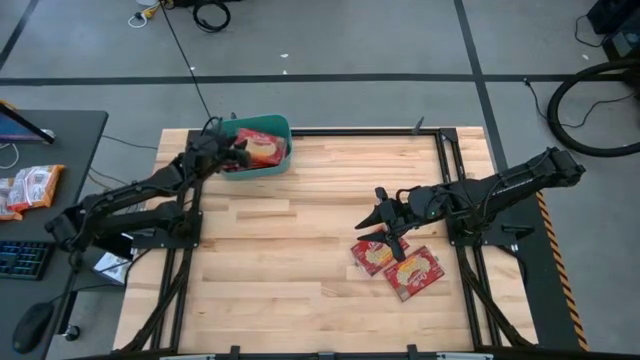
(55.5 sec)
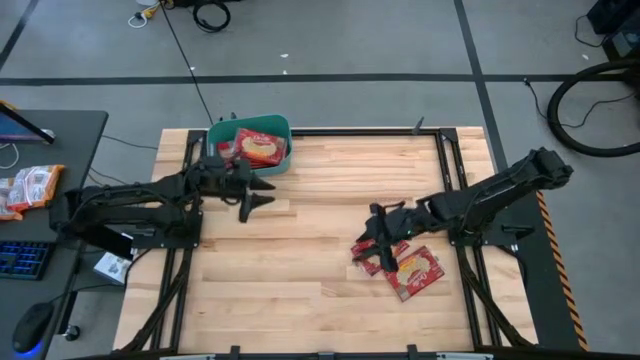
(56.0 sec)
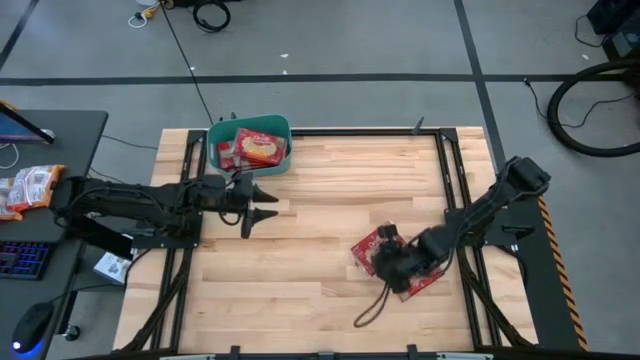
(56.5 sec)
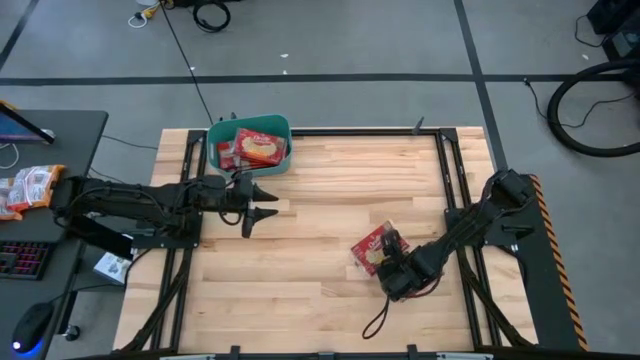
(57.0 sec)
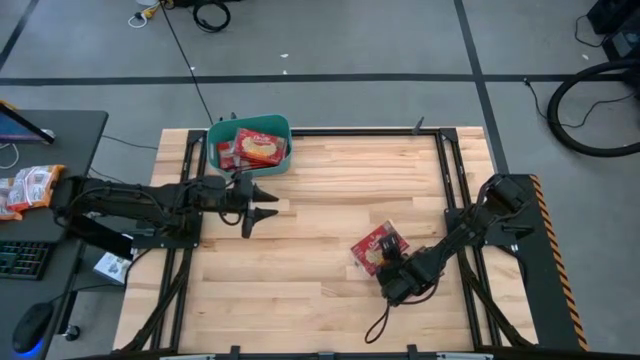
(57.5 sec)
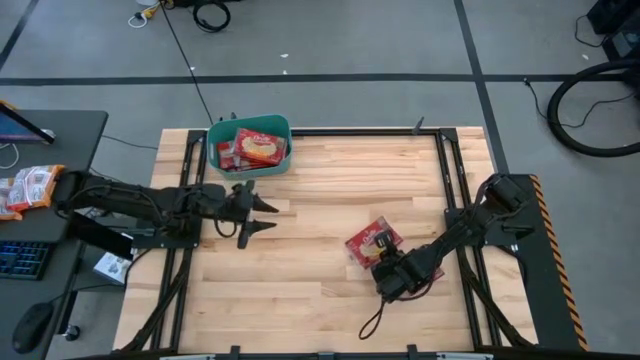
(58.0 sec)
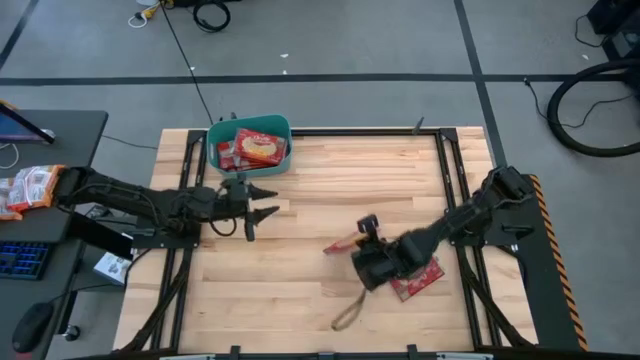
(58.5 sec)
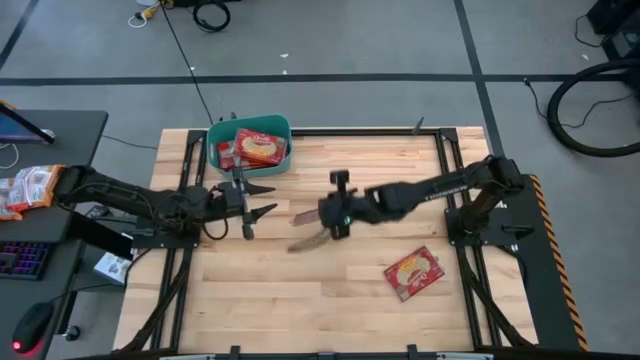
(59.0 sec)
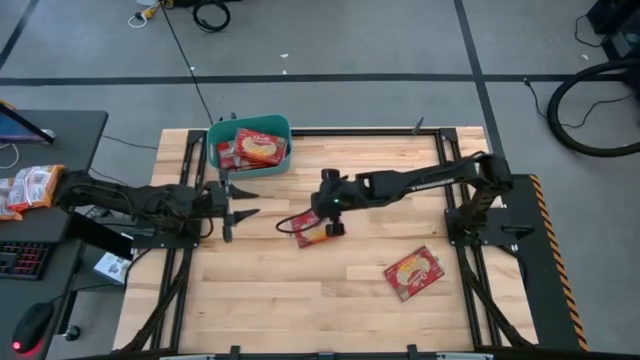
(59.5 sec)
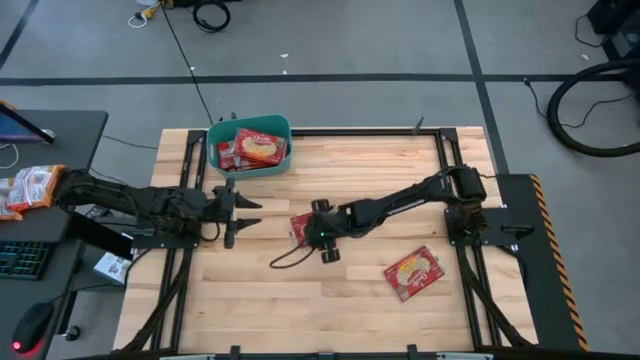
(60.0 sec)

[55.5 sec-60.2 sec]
Task: Sort popcorn bags into baskets
Put the popcorn sachet into the bin

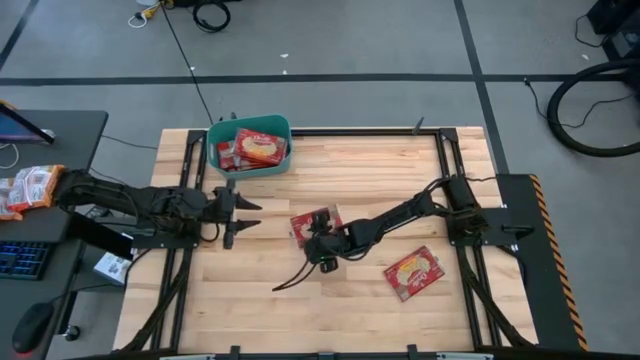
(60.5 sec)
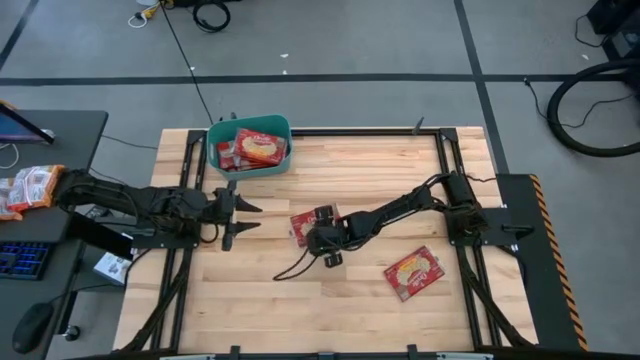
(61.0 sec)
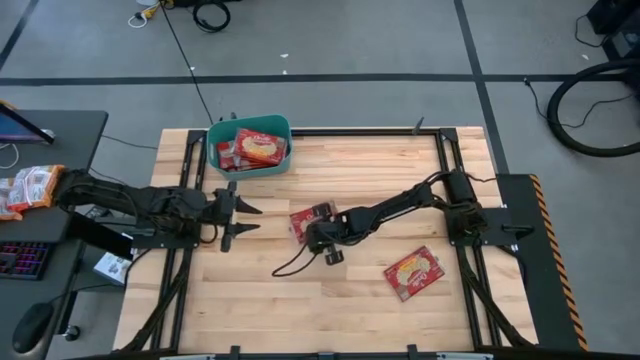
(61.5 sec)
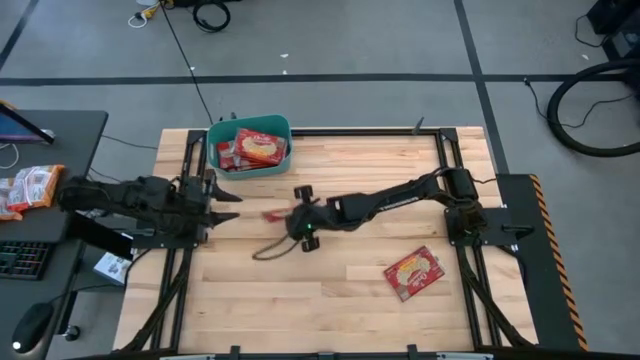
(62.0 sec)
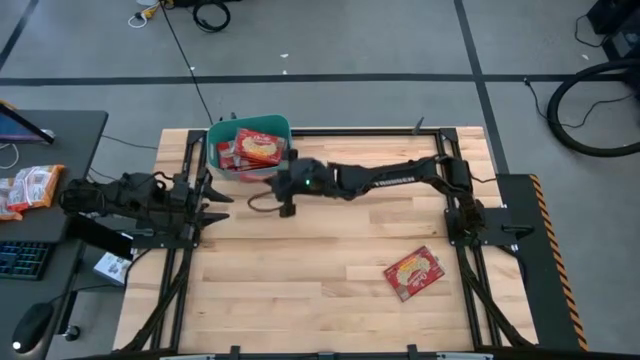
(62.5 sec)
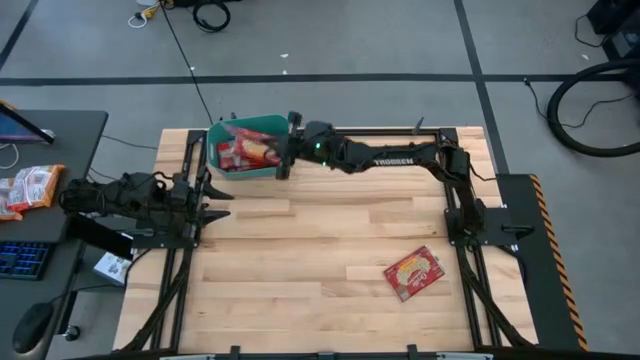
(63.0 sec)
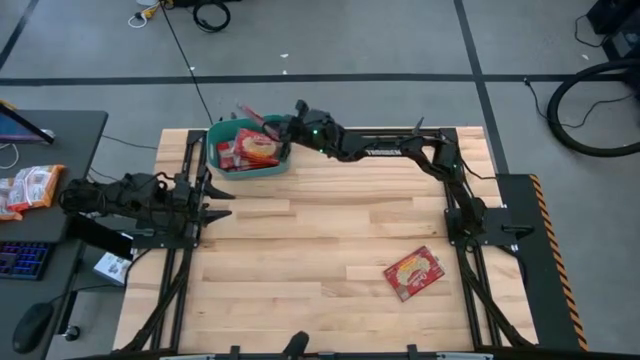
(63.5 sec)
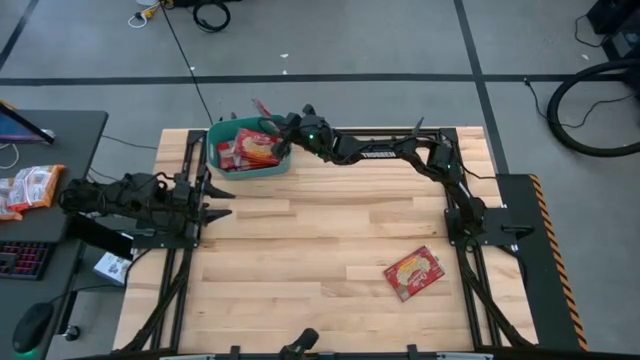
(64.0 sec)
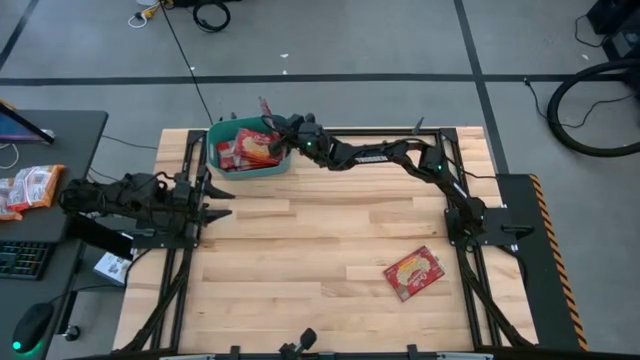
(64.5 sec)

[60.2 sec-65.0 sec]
Put the popcorn sachet into the bin

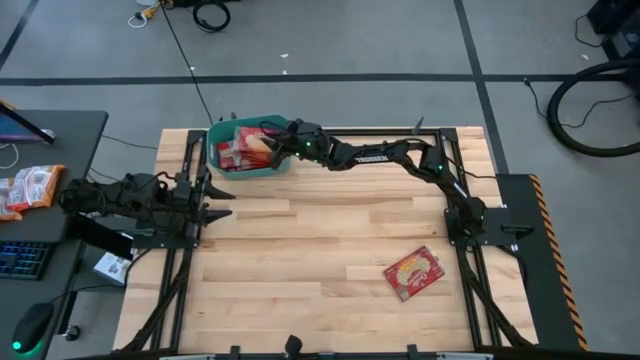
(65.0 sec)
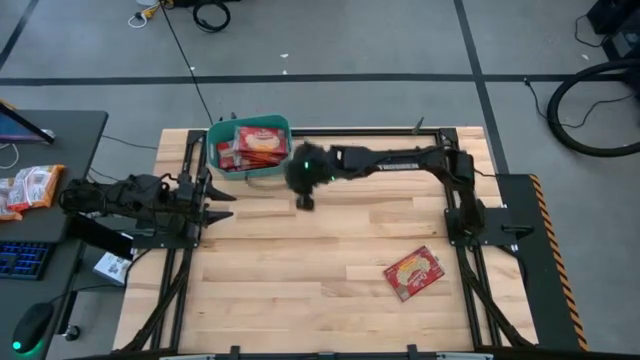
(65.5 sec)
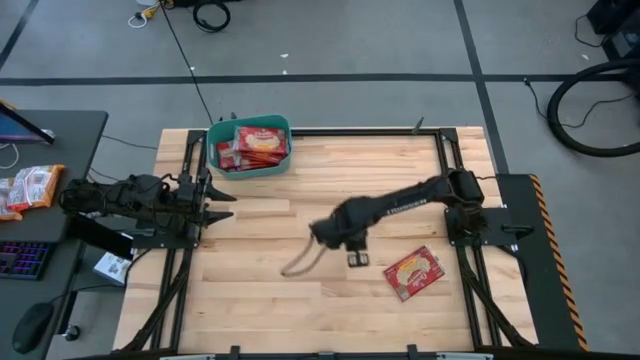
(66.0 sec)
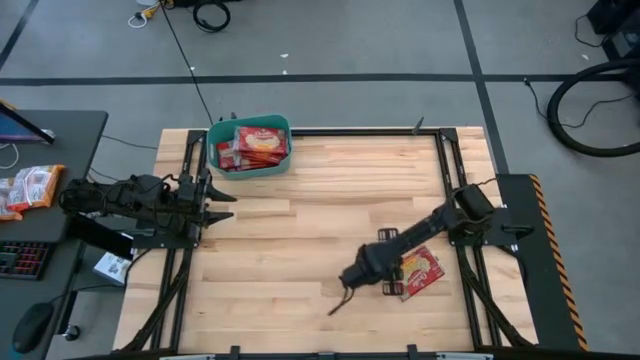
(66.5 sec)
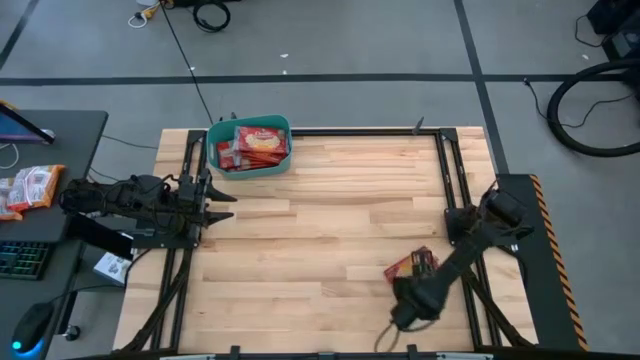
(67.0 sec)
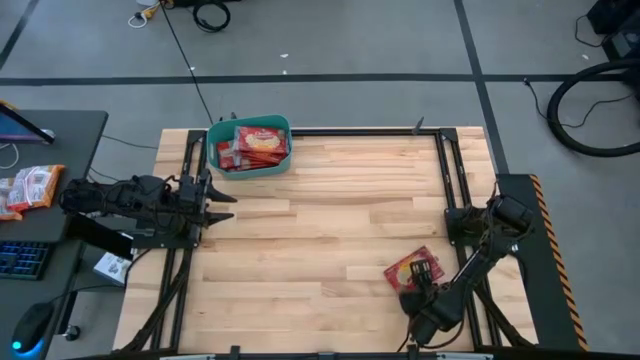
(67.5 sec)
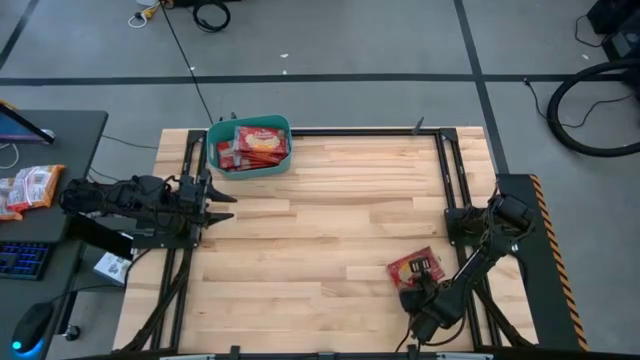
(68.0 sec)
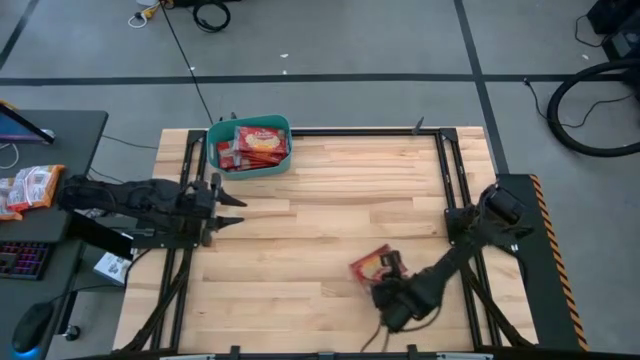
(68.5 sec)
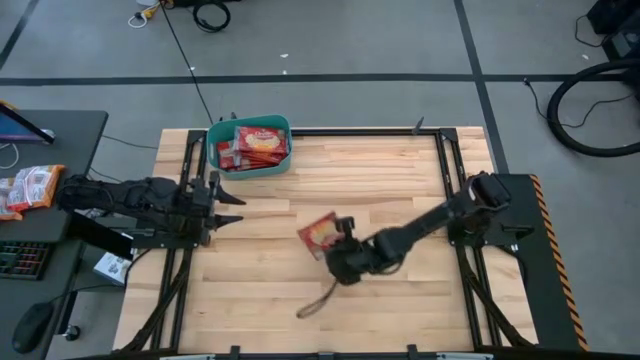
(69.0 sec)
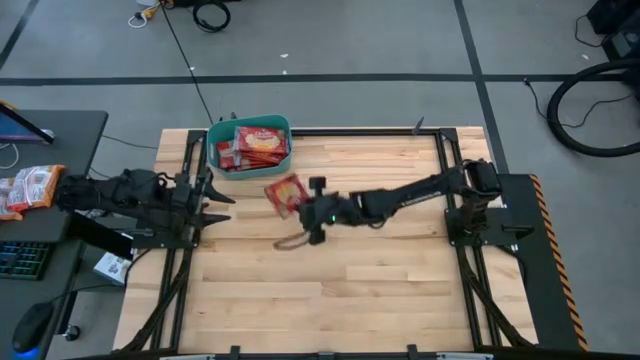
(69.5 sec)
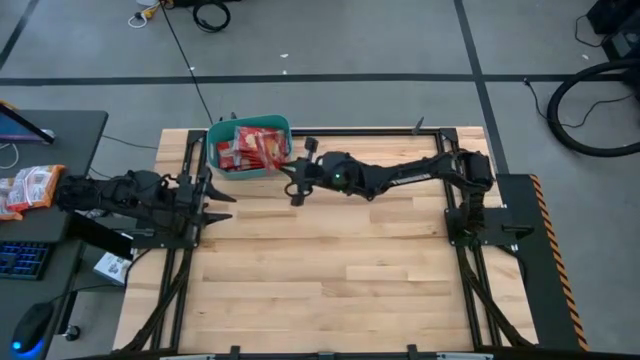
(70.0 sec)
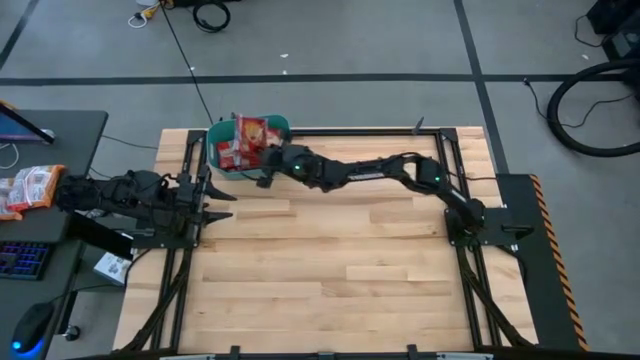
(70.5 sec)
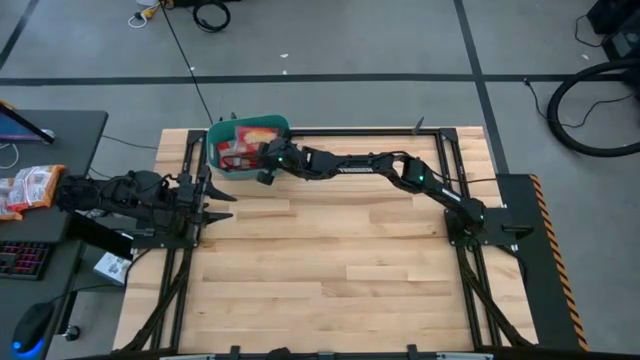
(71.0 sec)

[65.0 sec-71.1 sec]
Put the popcorn sachet into the bin

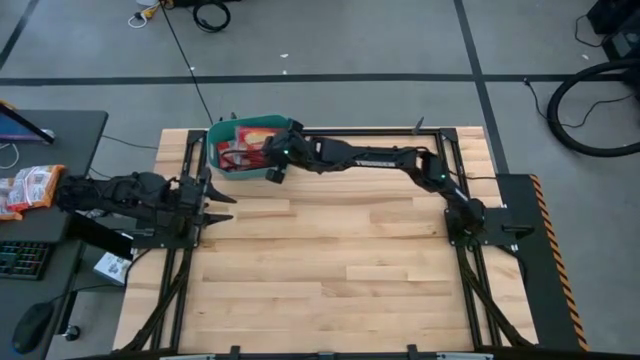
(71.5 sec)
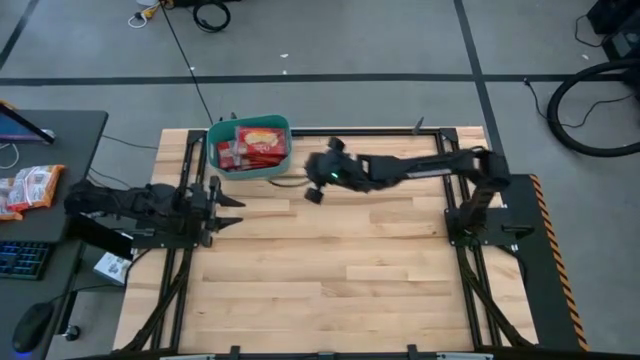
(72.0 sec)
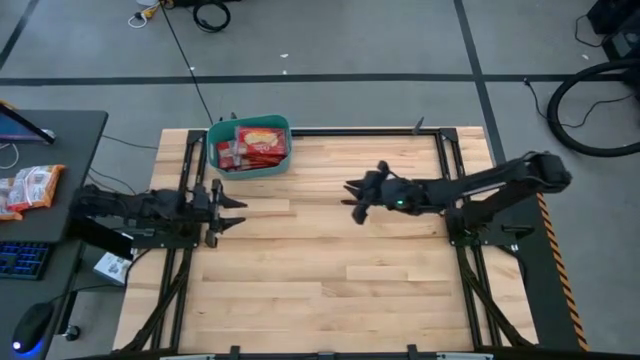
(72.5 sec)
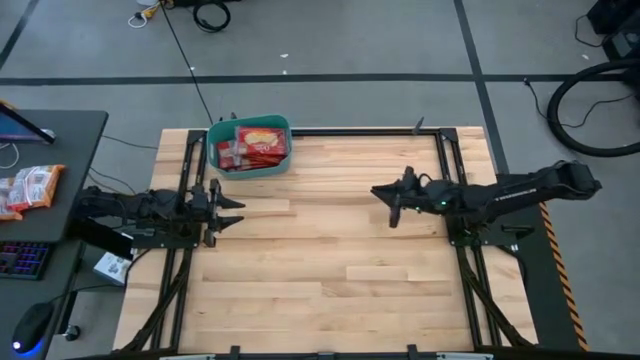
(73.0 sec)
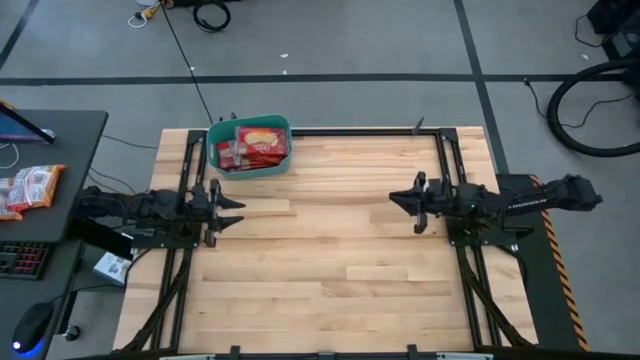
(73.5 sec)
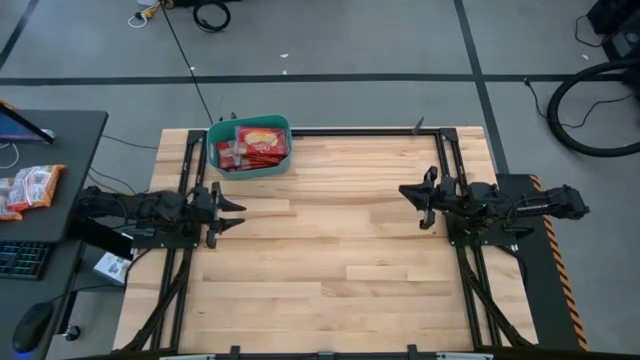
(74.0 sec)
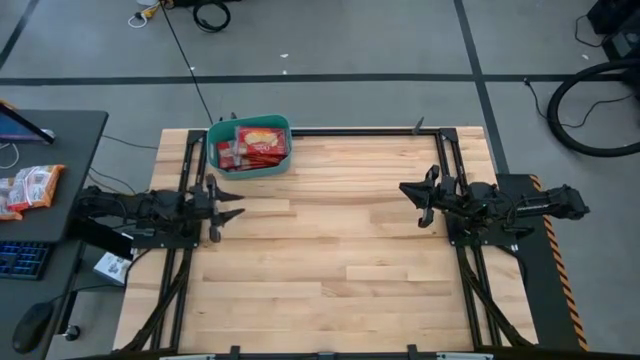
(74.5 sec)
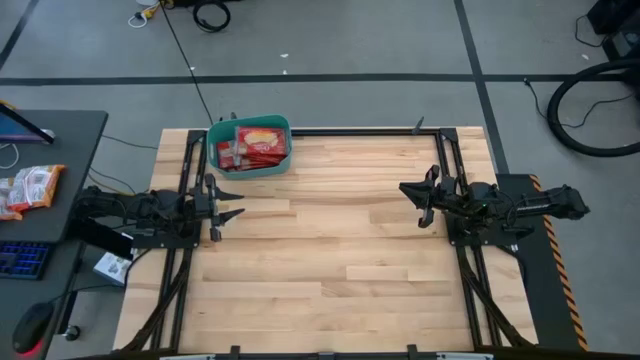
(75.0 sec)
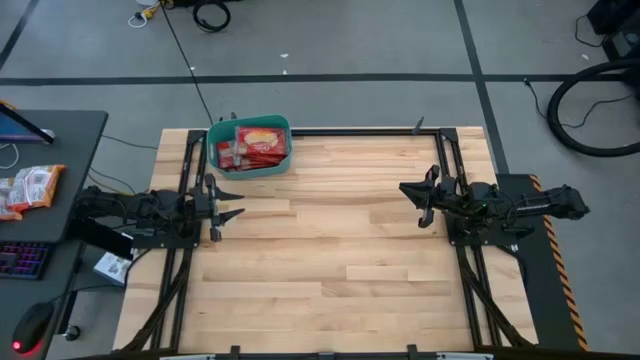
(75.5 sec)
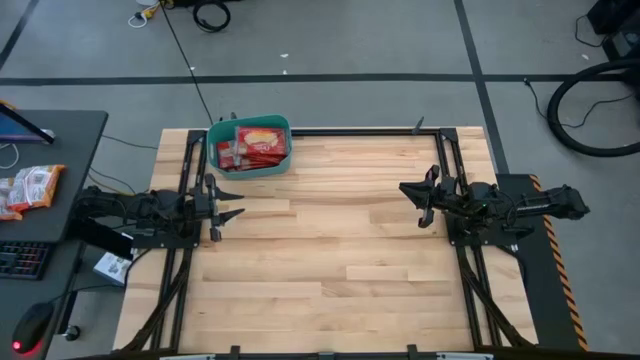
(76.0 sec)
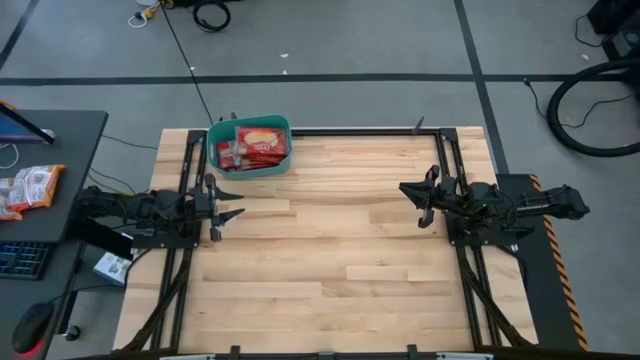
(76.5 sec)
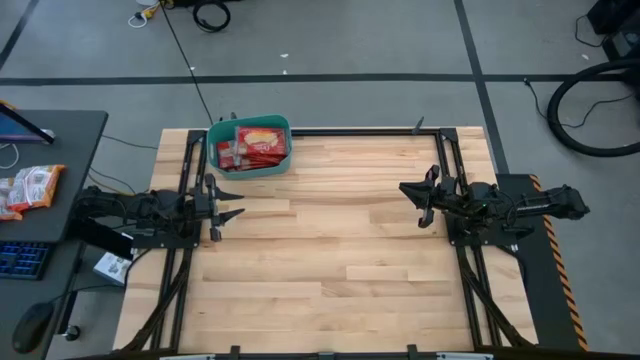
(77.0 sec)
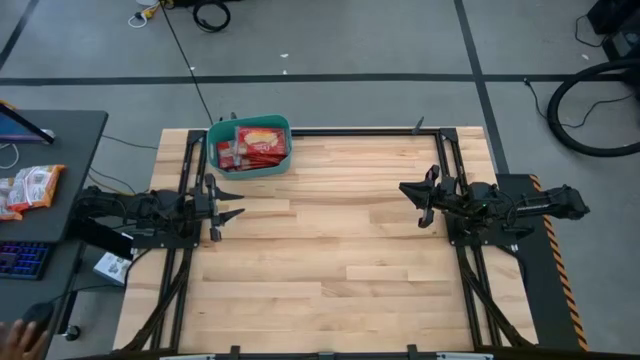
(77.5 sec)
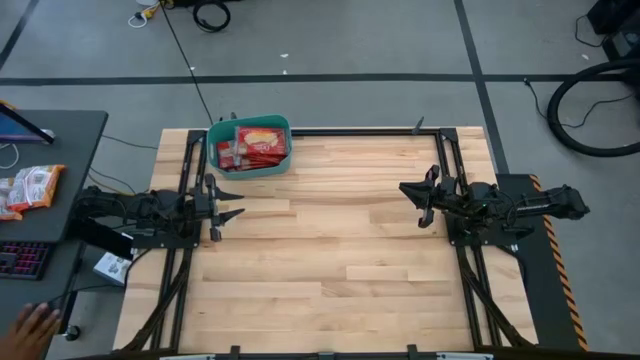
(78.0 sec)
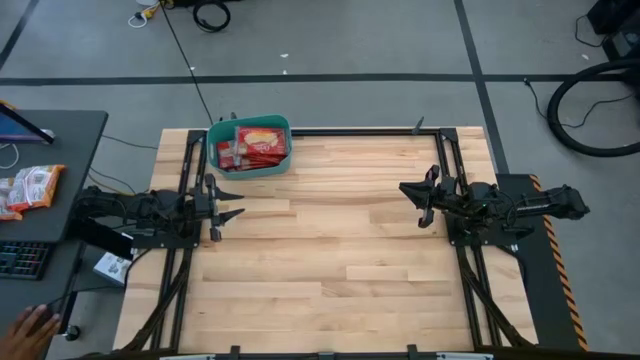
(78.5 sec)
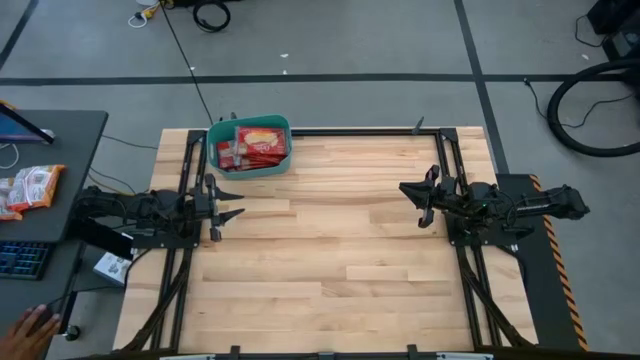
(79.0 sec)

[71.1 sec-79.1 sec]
Return to Home Position
